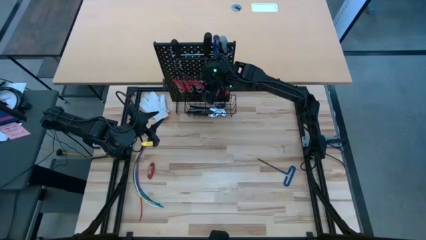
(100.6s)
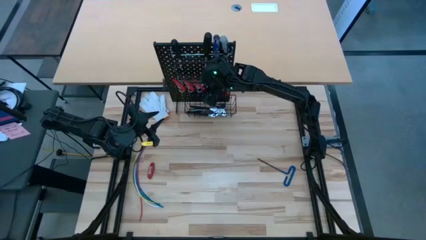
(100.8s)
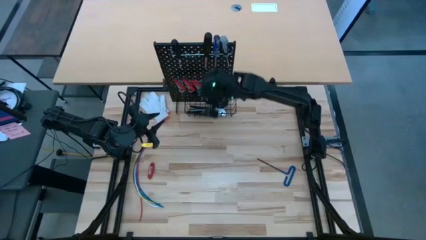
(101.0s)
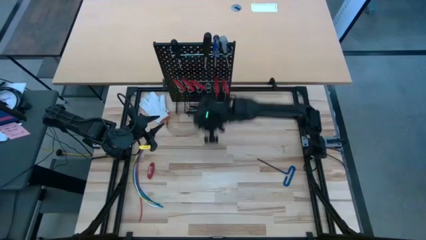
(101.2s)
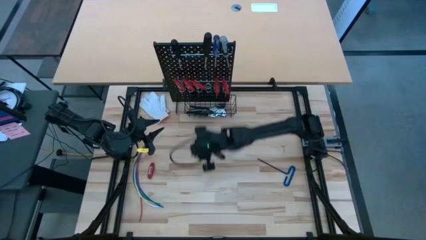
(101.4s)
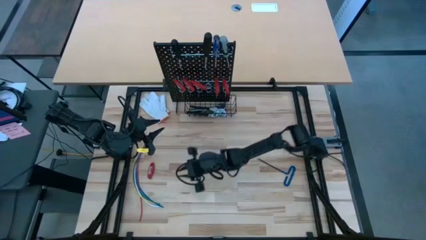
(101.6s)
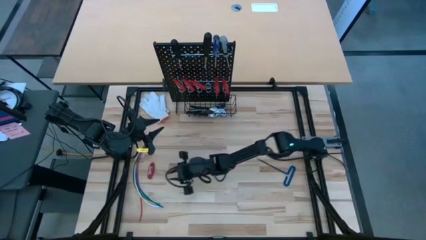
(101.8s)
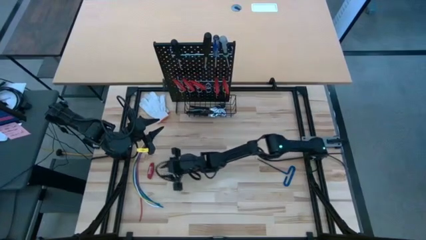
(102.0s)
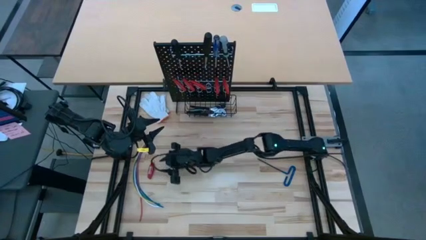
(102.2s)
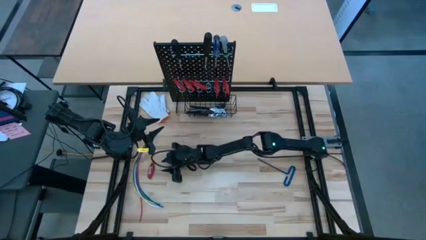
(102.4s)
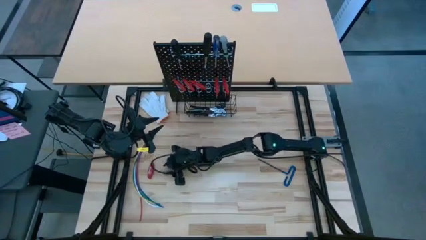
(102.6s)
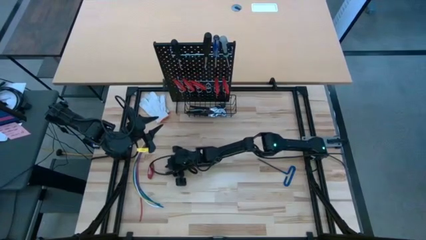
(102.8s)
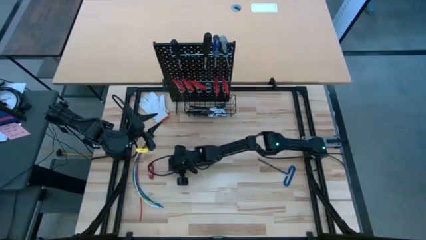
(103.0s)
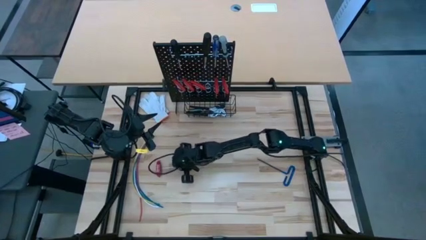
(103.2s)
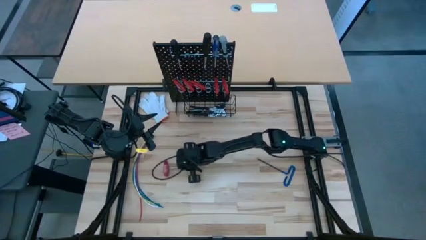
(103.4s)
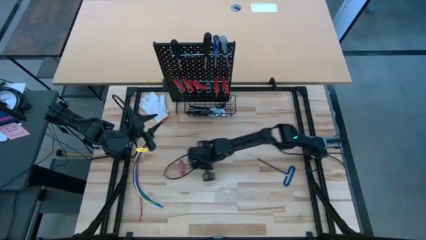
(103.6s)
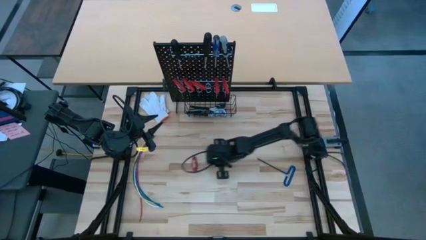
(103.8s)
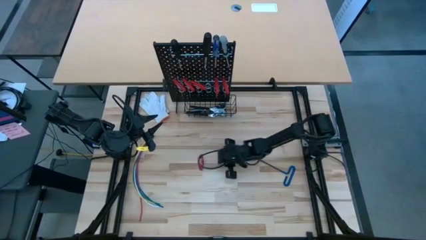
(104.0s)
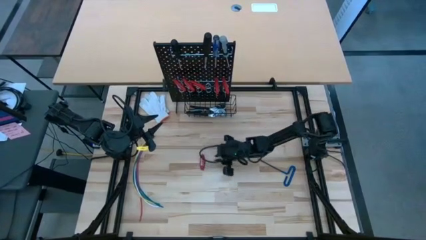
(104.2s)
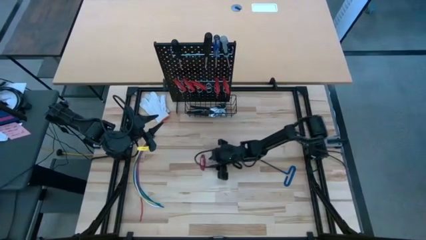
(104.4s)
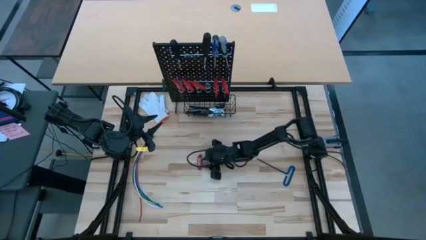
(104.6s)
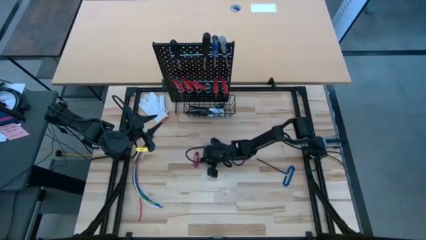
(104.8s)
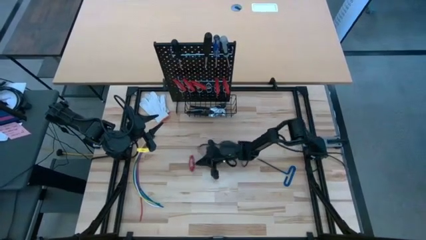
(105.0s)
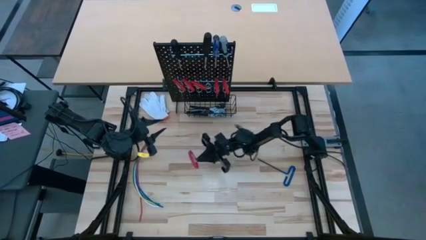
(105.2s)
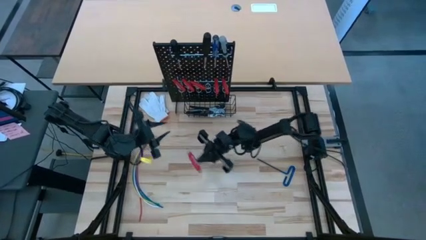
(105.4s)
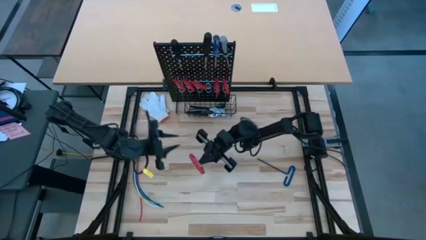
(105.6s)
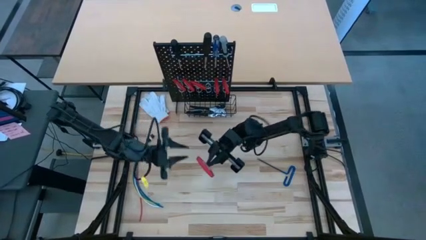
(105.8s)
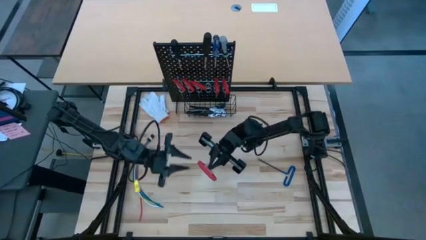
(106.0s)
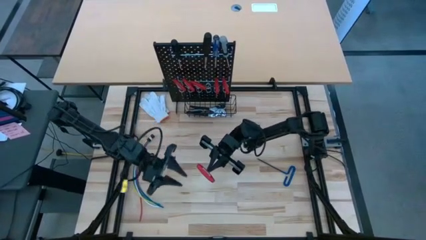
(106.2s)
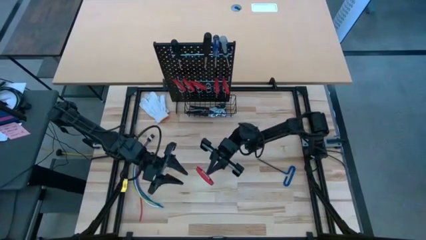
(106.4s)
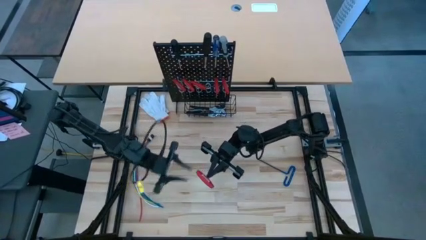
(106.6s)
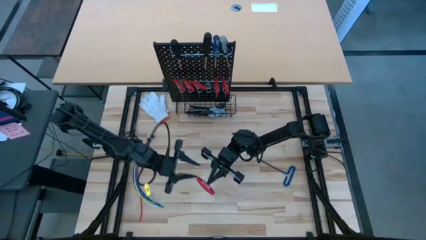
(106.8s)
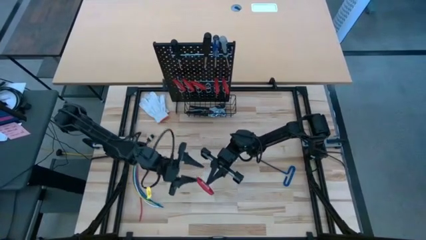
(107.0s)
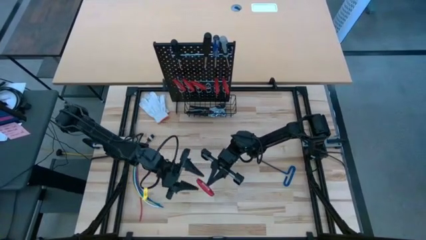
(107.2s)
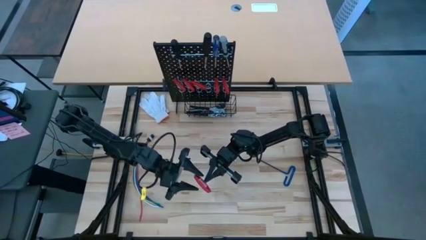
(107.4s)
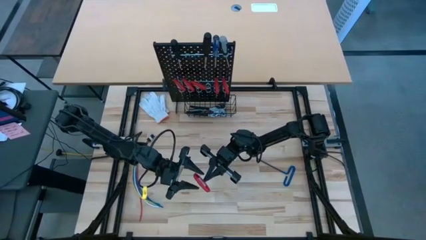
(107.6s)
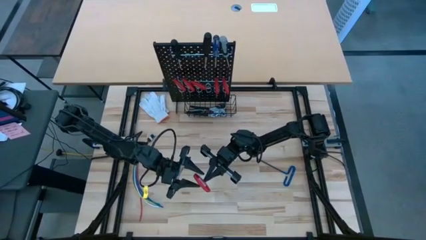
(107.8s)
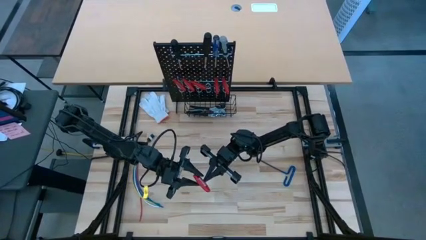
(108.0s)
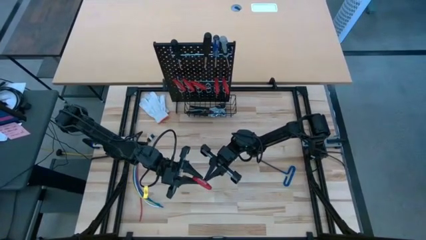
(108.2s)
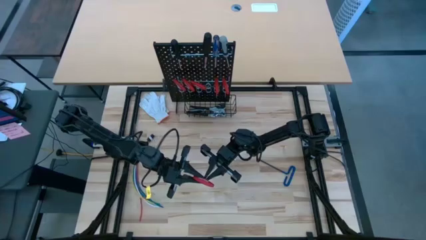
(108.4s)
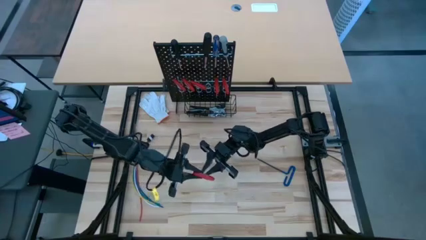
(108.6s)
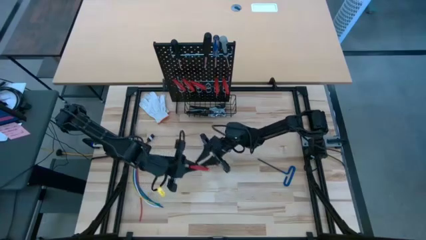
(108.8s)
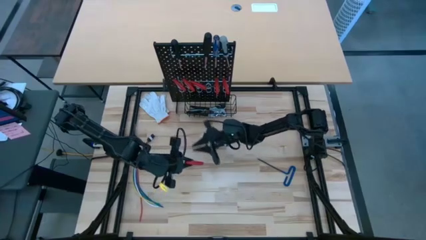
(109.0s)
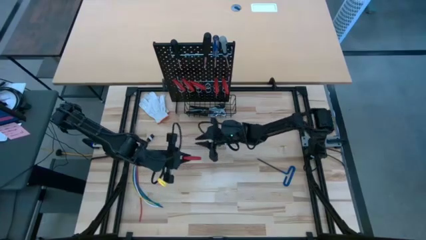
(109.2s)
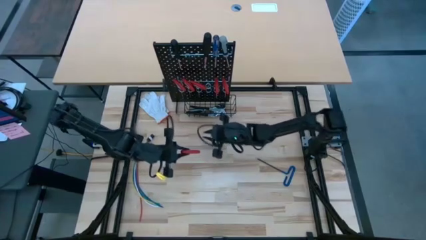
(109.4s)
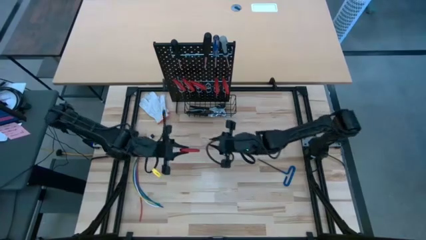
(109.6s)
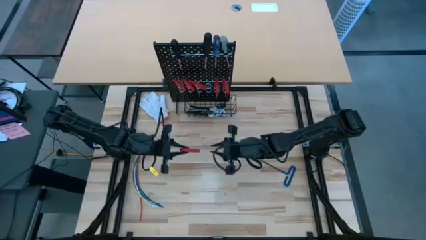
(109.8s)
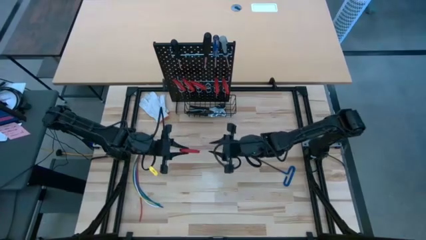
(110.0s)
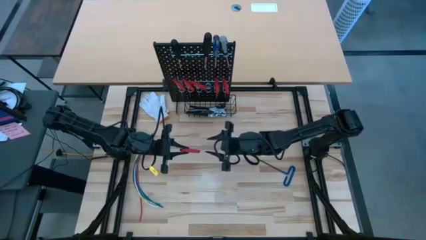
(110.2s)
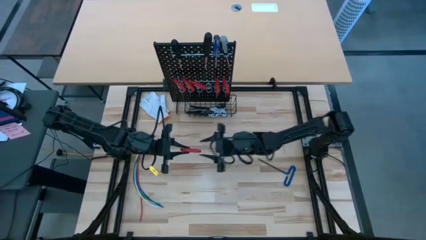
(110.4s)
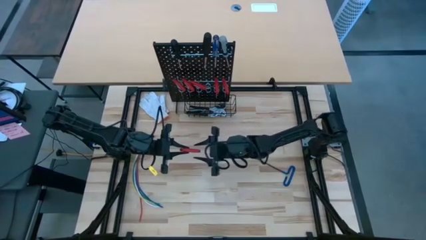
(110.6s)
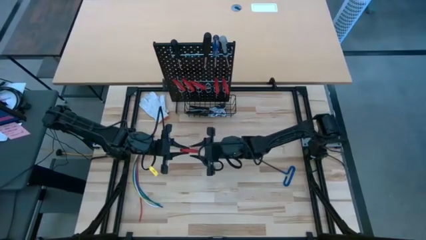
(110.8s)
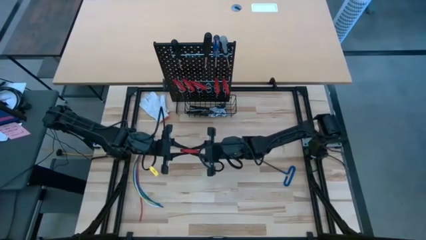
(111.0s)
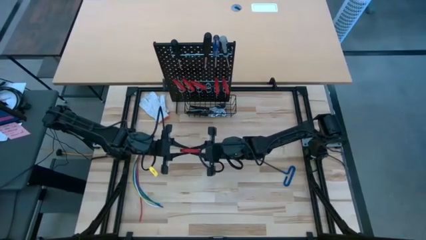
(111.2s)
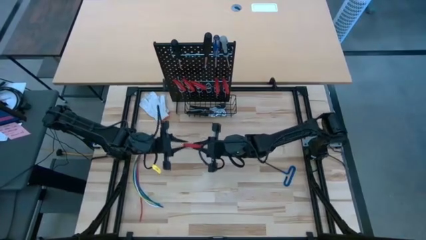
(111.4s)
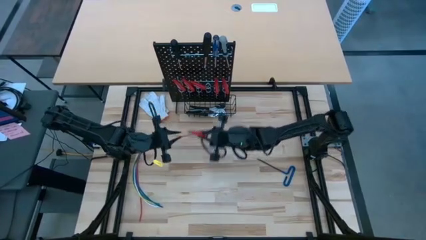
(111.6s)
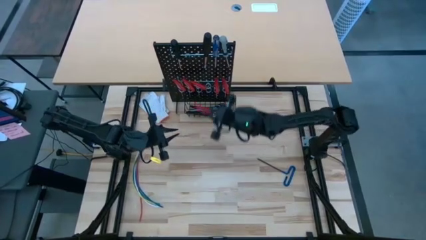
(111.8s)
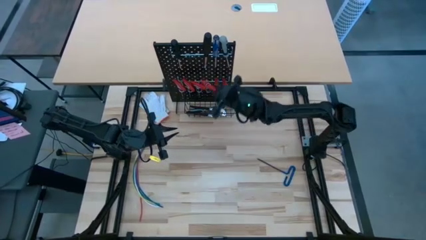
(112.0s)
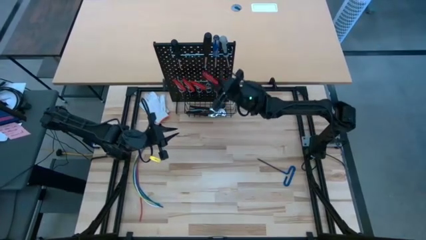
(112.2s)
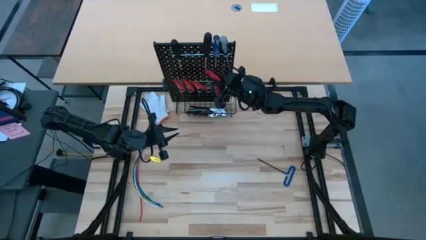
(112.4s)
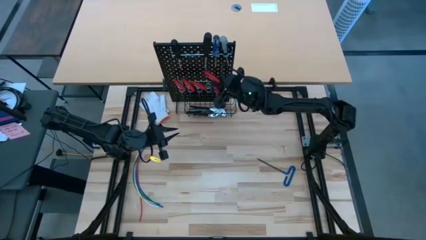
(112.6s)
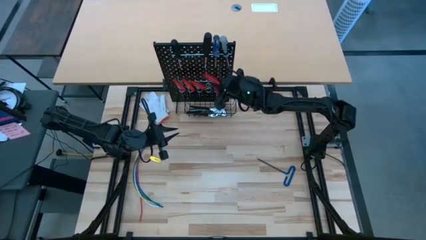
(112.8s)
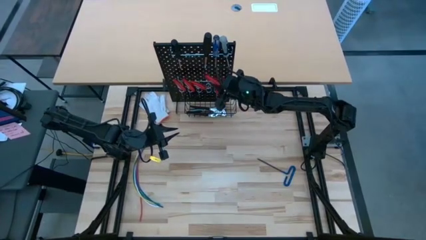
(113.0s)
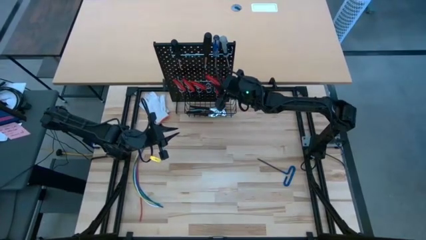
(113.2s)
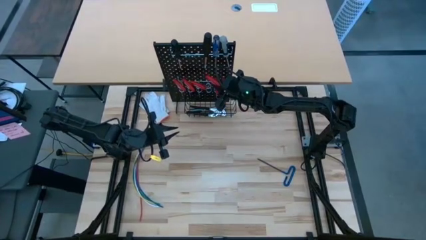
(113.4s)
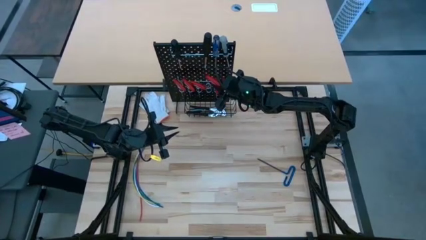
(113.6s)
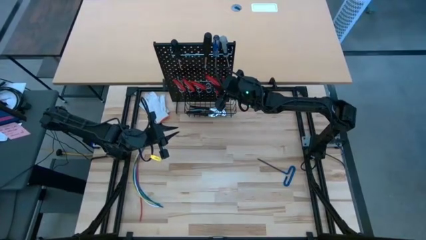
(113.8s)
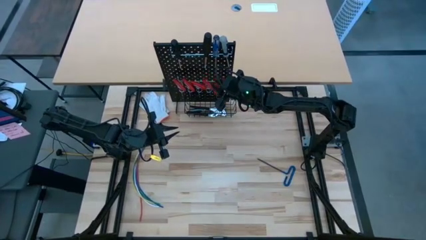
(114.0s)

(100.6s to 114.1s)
Task: Hang tools onto peg board
Hang the red allen wrench on the black pegboard

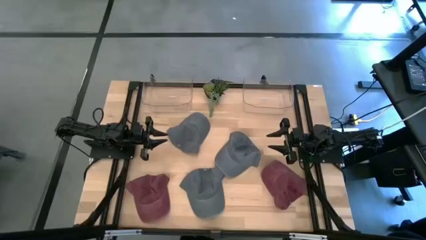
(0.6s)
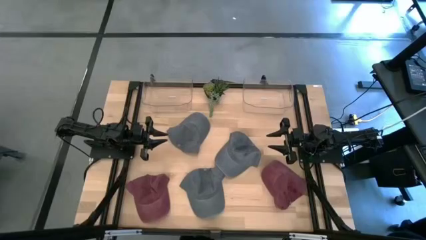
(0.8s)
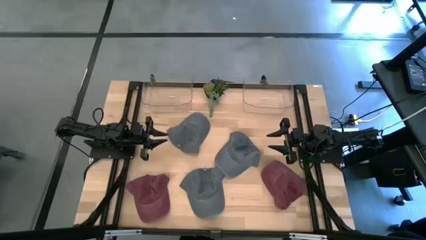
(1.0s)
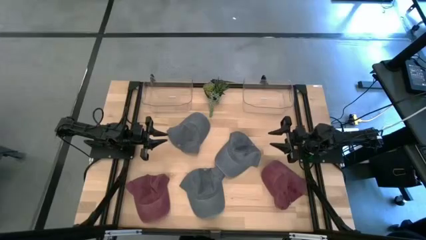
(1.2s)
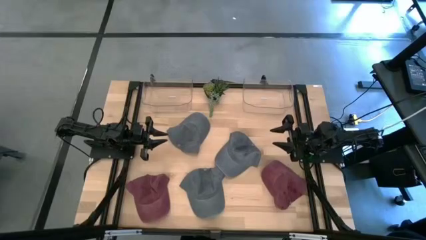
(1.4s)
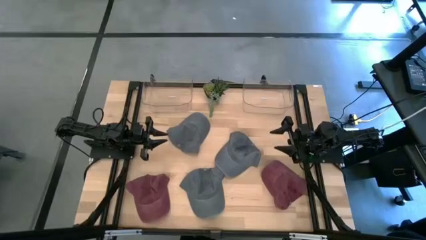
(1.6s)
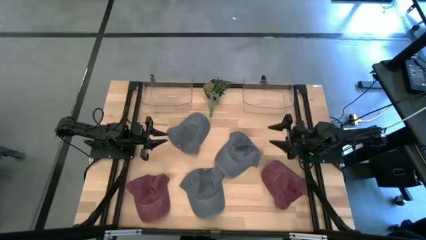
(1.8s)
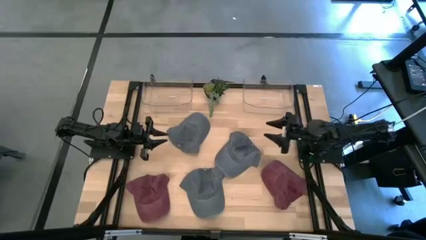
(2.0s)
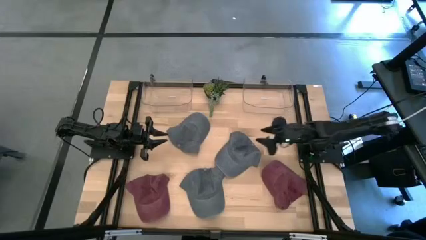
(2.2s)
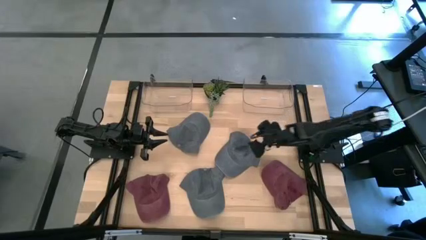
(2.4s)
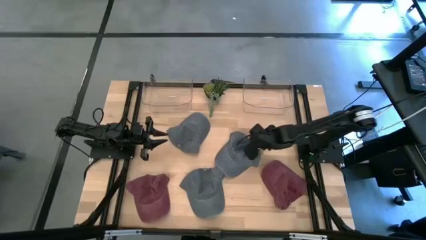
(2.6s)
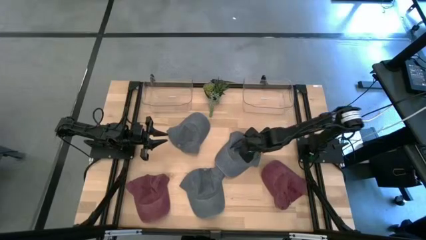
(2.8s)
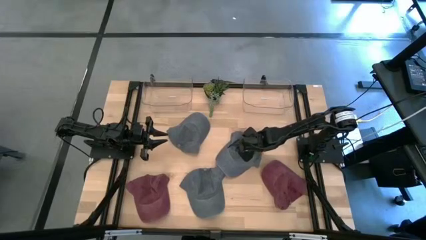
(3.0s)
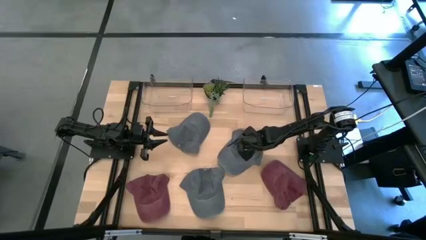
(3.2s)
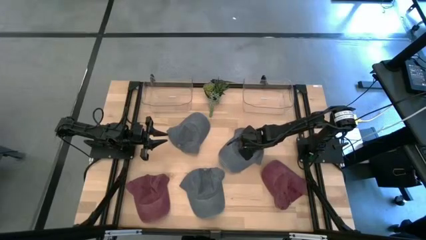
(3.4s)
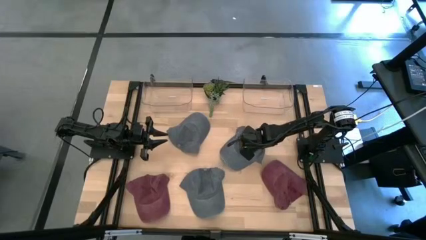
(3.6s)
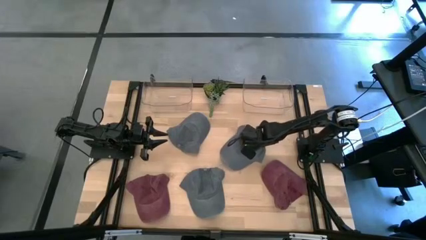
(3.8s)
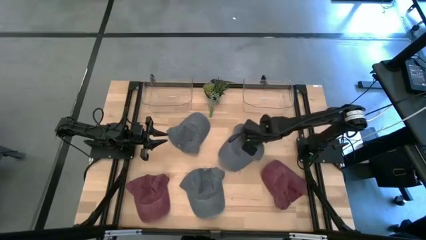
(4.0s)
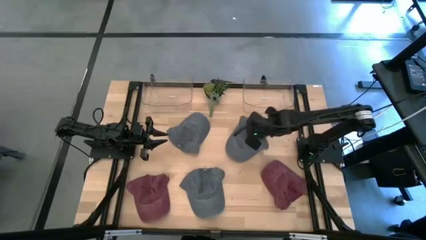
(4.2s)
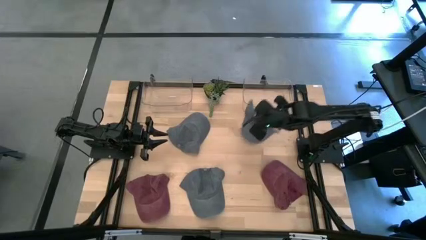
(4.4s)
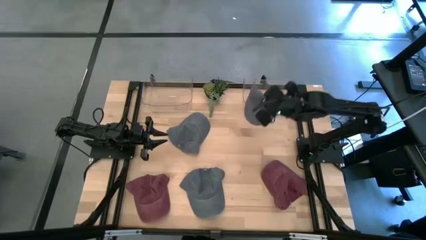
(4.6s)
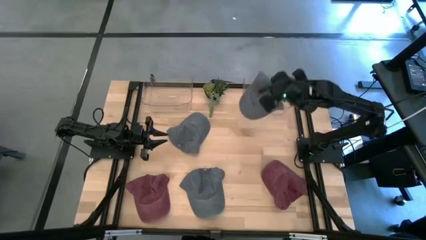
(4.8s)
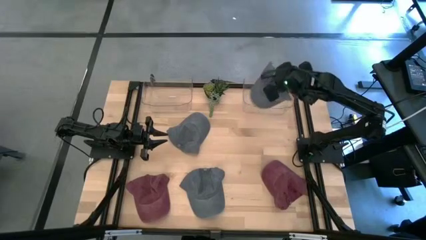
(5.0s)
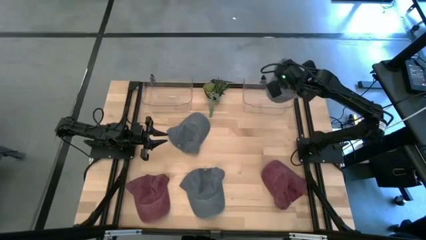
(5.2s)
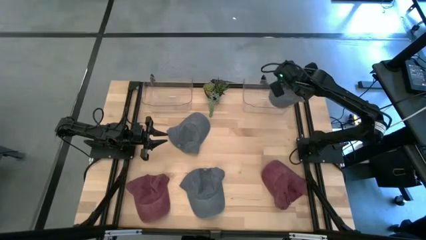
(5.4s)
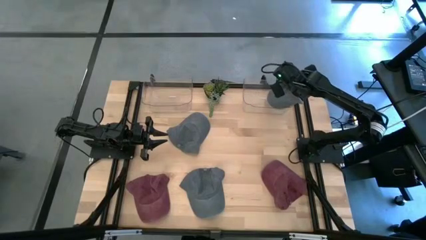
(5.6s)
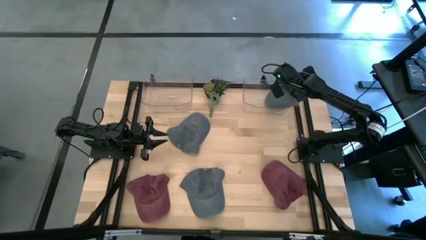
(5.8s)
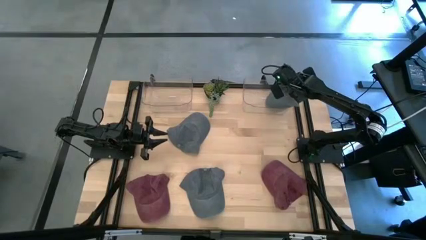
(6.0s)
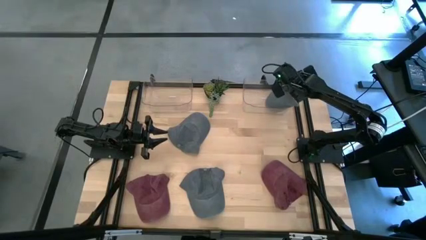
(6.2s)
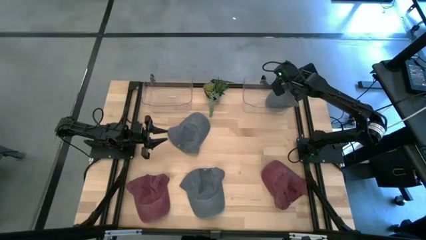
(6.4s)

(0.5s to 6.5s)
Task: Pick & Place hat
Put the right gray cap into the right transparent bin
